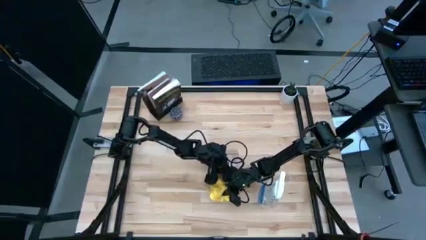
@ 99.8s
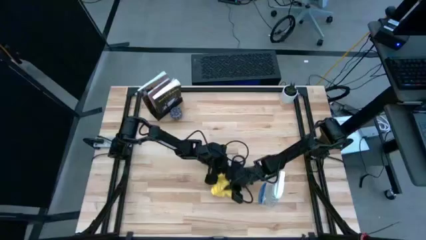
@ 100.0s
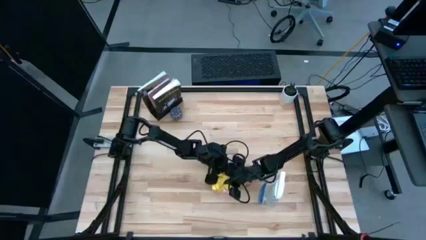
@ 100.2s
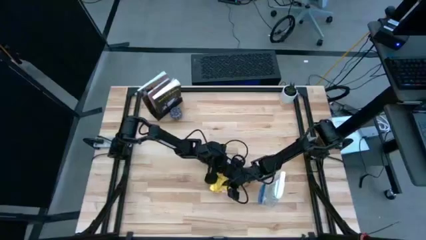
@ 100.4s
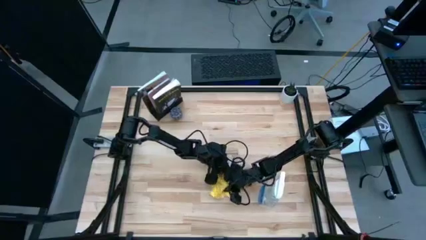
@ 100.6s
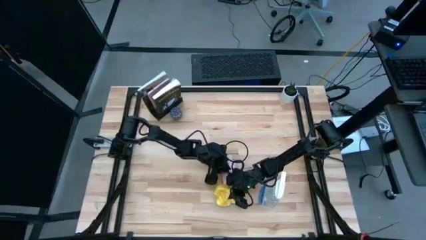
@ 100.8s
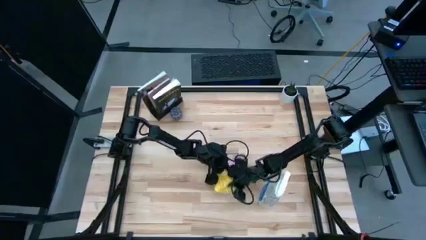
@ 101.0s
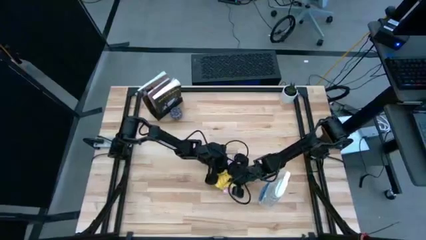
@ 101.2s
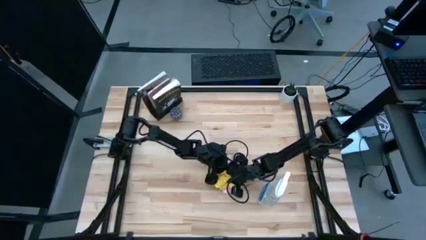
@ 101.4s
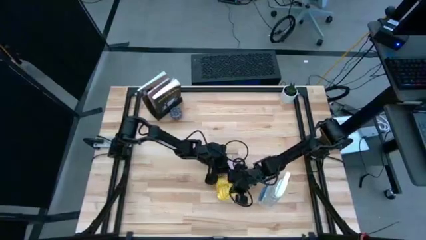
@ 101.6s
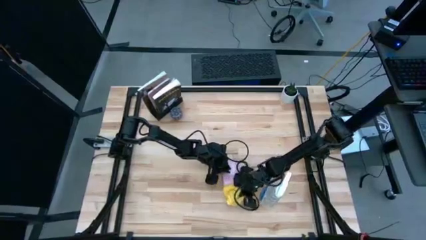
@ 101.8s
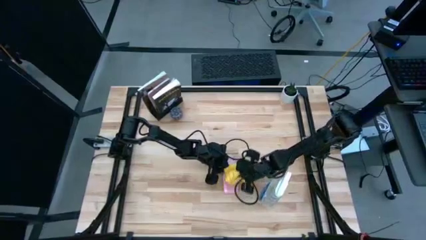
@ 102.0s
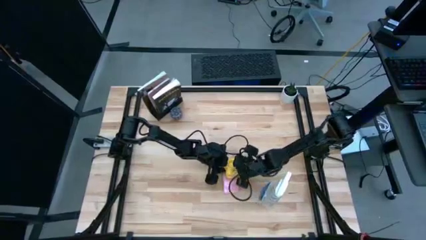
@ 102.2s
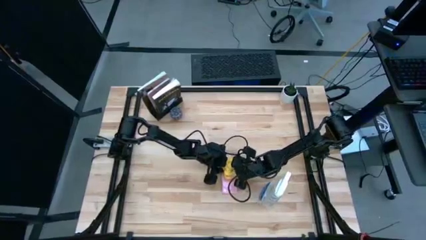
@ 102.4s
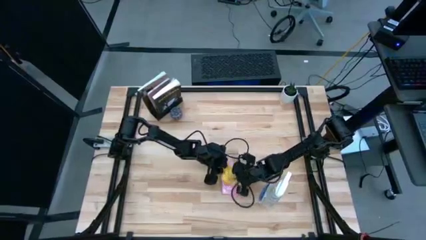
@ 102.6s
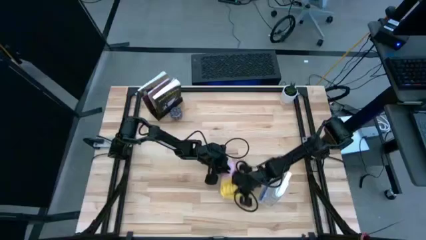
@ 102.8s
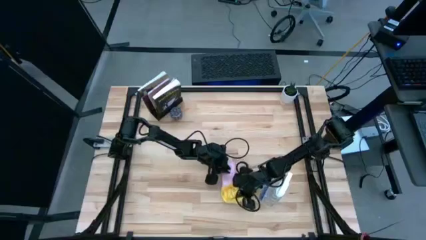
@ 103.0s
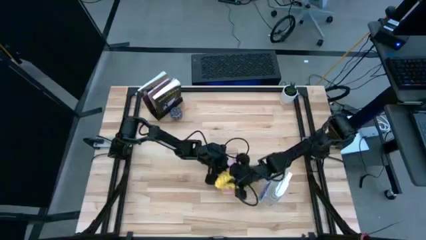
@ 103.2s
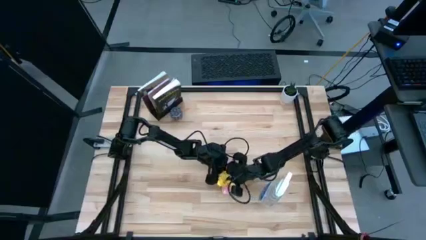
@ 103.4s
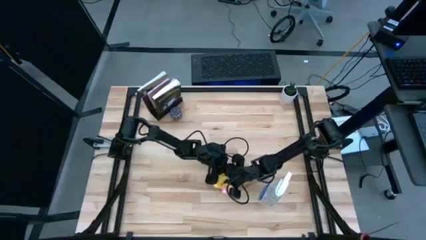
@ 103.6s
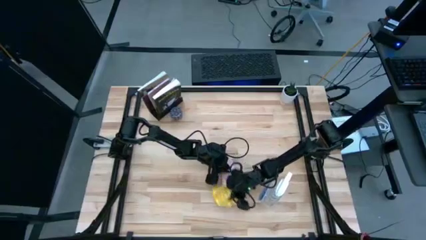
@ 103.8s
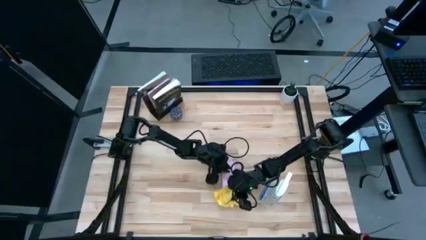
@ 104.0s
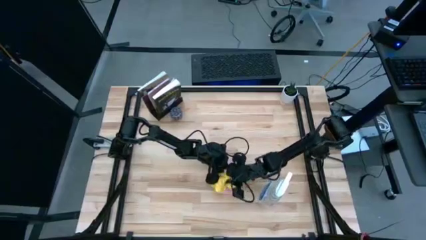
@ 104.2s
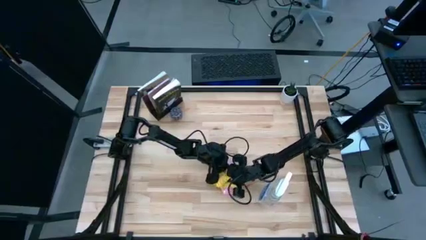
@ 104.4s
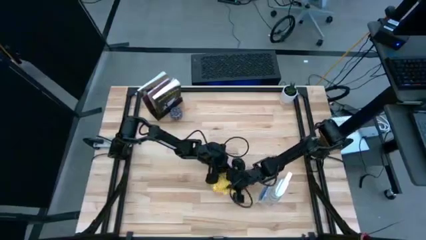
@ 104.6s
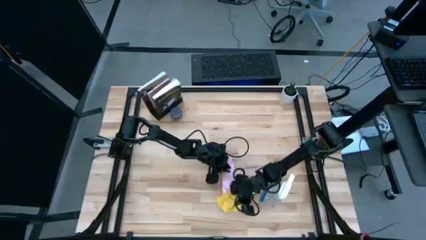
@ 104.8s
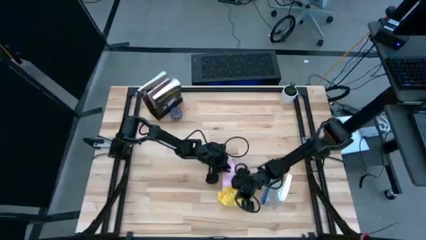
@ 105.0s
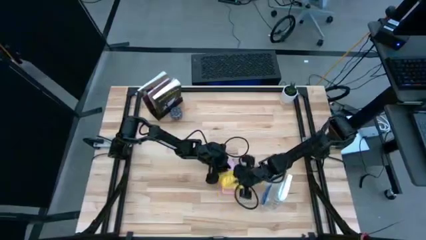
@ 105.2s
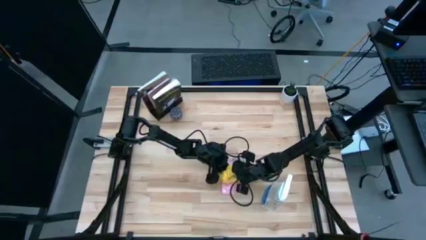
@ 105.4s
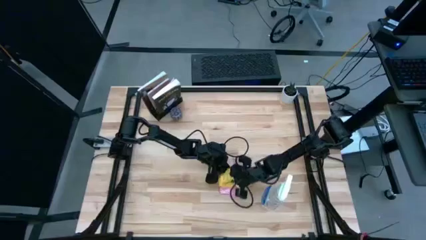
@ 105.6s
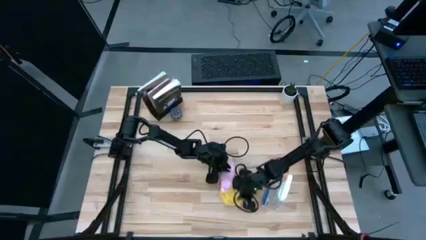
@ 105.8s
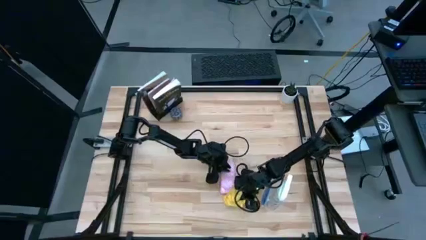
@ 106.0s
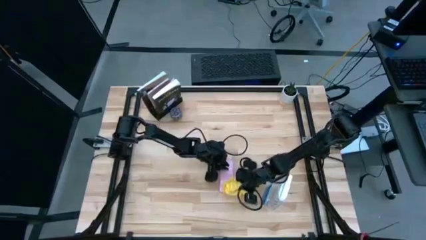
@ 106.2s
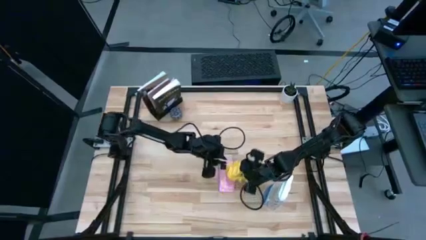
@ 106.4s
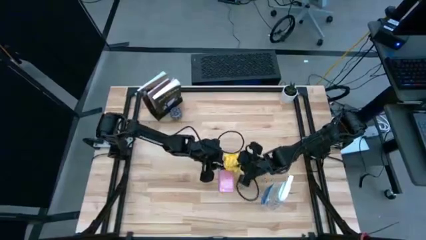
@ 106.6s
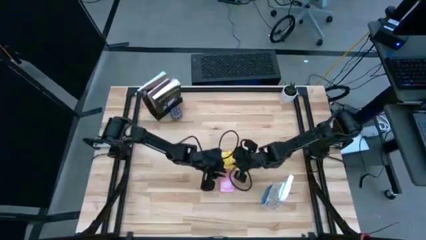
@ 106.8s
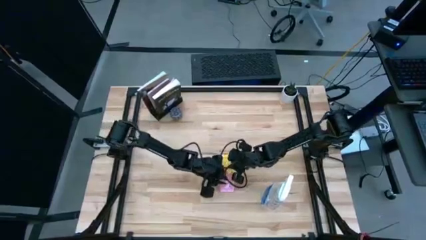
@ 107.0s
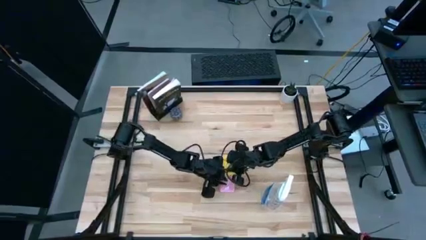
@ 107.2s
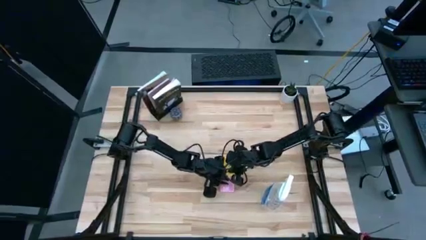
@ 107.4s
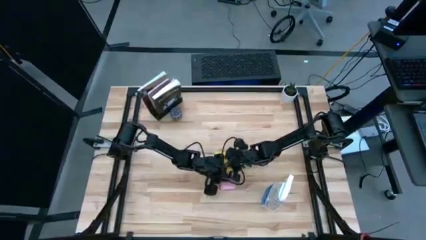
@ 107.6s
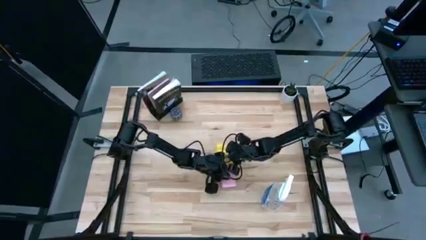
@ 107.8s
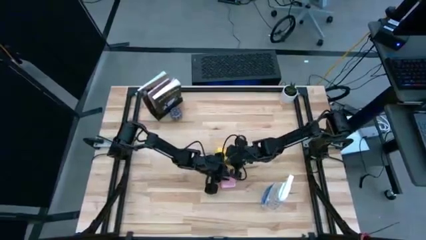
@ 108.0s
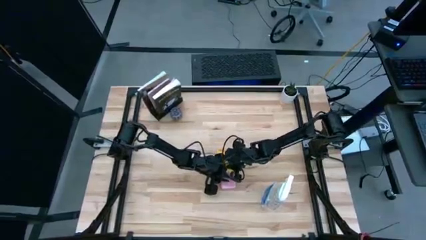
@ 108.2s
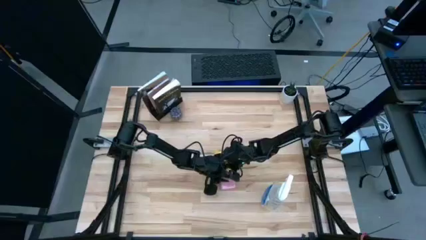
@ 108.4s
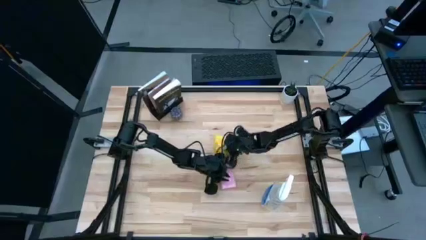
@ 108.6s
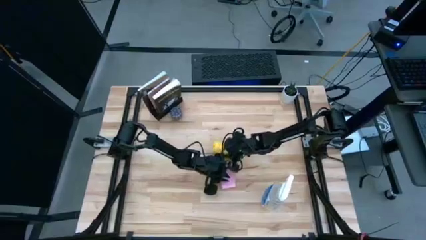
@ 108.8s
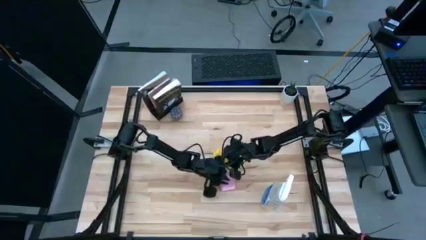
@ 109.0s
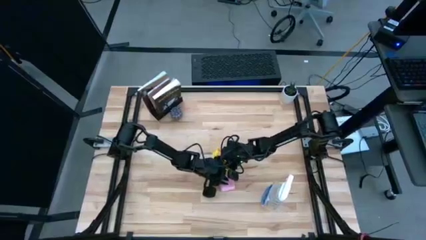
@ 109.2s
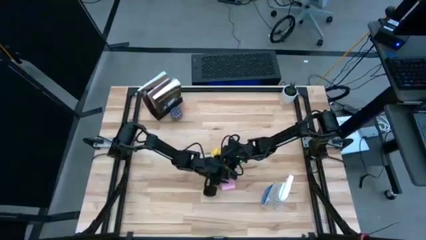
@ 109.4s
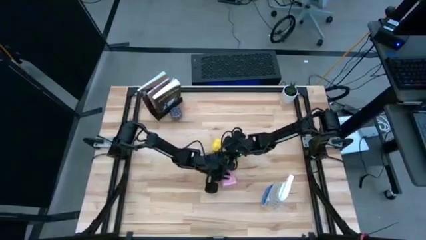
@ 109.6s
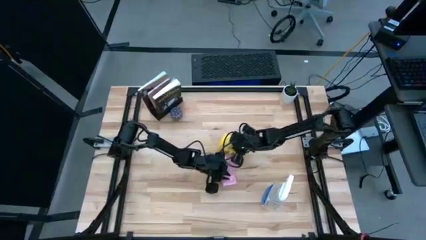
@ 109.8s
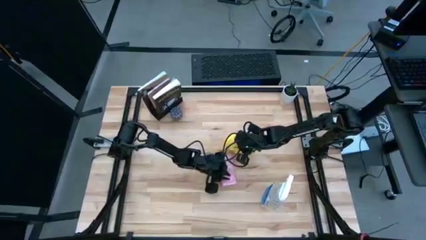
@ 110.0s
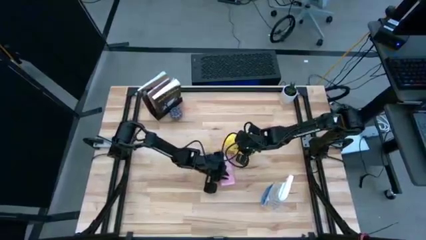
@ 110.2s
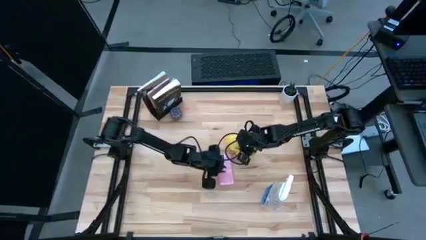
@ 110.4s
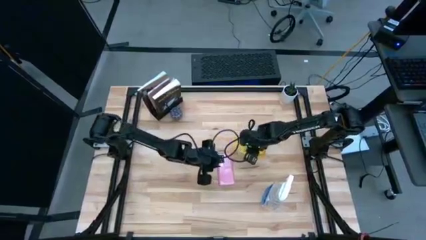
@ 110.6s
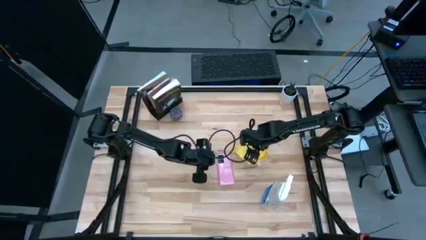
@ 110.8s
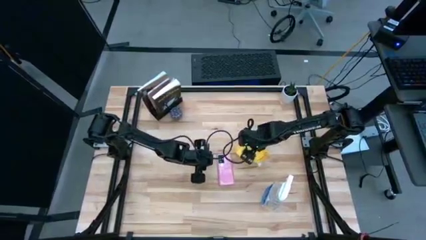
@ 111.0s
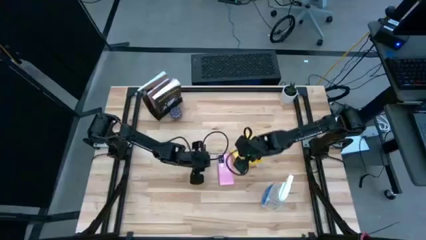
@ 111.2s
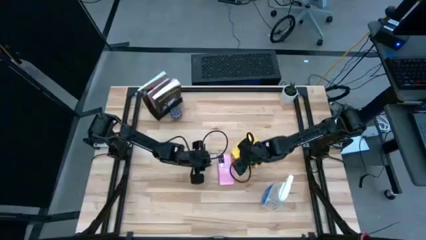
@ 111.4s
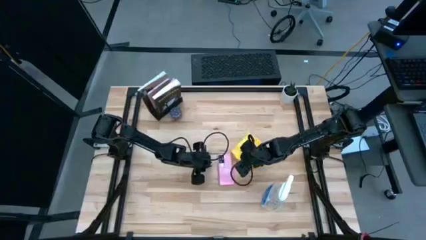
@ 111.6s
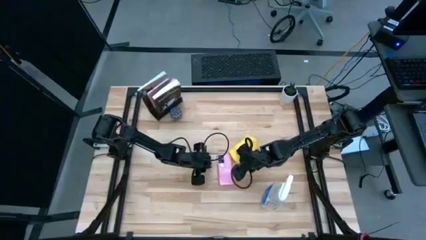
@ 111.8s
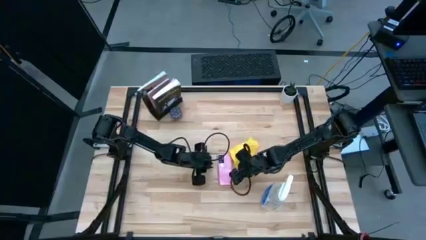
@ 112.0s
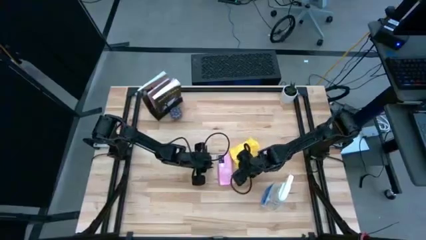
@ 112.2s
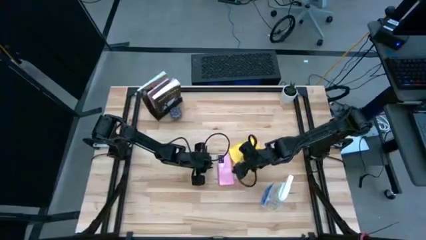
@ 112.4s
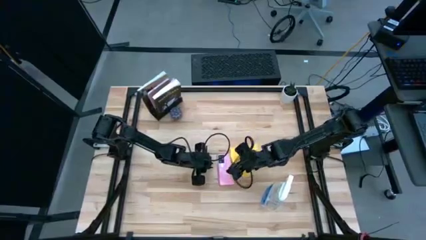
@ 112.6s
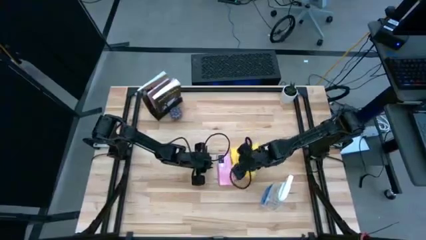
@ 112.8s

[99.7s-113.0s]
Task: Apply microfiber cloth
Wipe the back of the pink cellphone with a yellow microfiber cloth

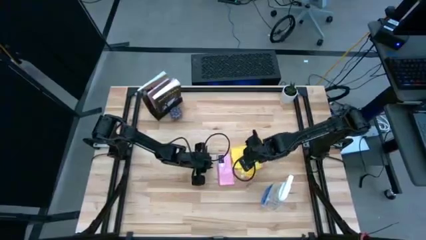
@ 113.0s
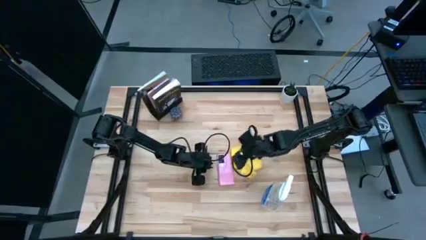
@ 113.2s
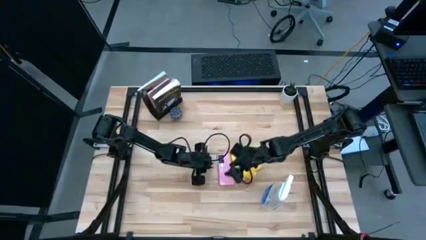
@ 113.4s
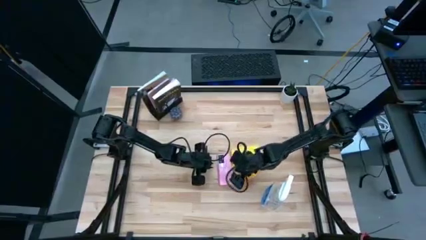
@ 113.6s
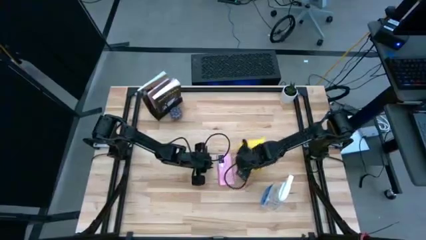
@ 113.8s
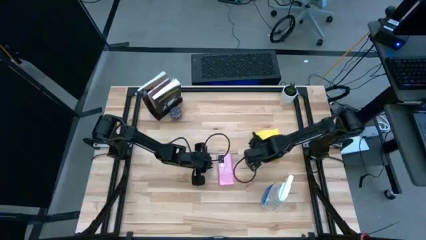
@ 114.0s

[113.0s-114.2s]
Adjust the yellow microfiber cloth

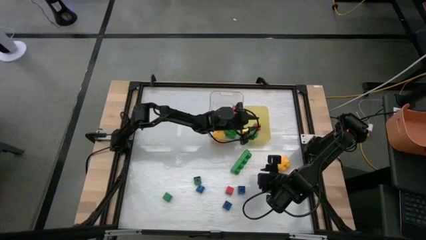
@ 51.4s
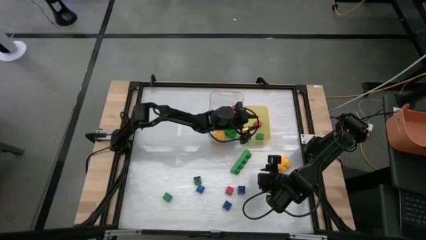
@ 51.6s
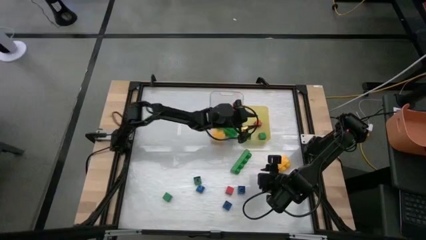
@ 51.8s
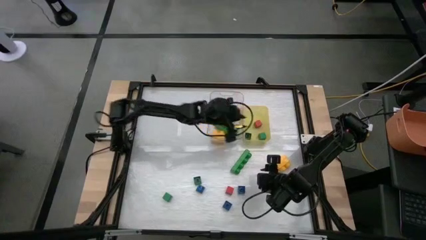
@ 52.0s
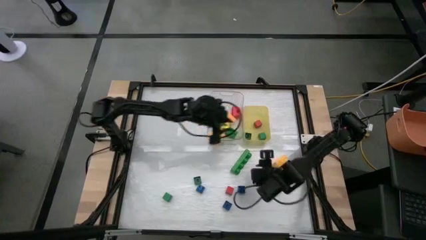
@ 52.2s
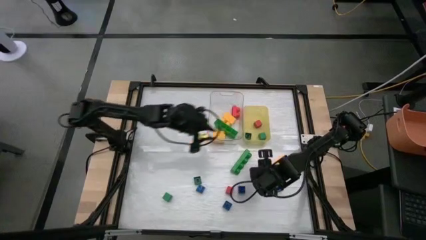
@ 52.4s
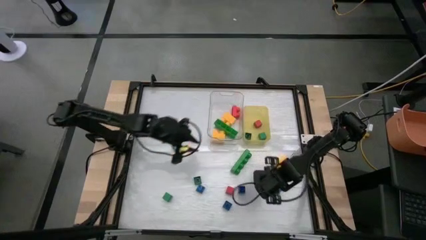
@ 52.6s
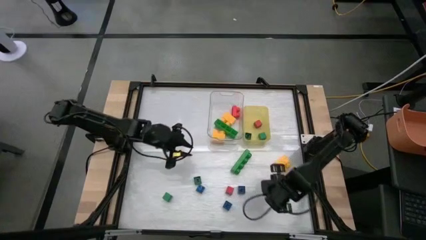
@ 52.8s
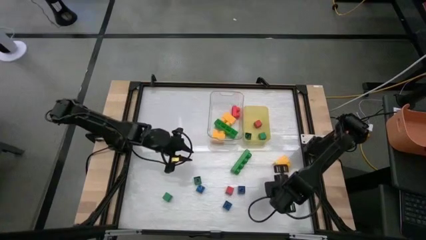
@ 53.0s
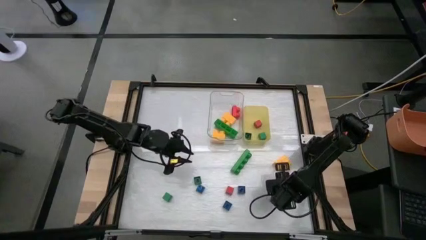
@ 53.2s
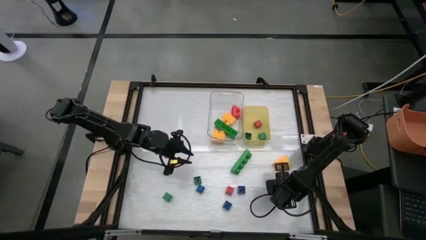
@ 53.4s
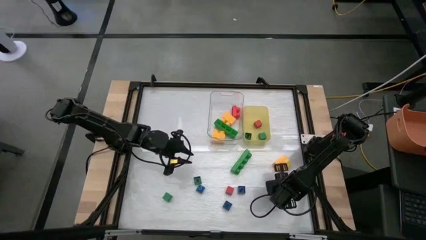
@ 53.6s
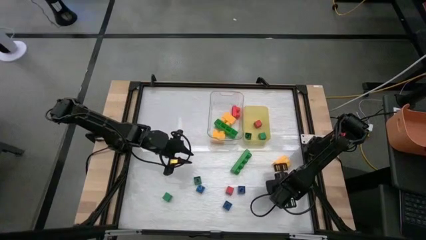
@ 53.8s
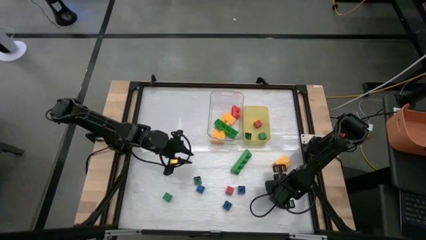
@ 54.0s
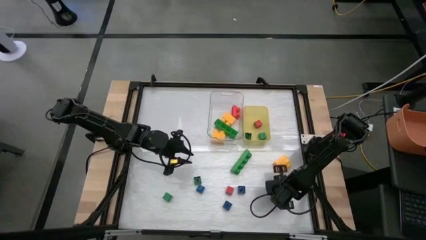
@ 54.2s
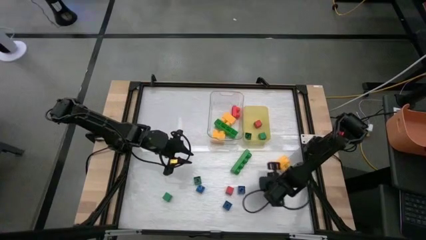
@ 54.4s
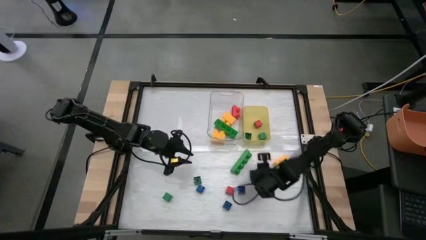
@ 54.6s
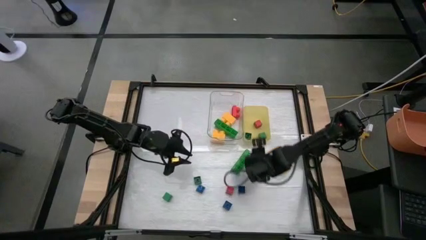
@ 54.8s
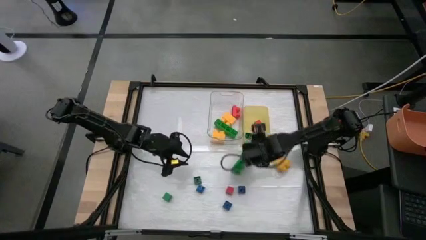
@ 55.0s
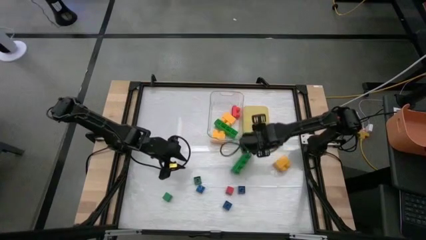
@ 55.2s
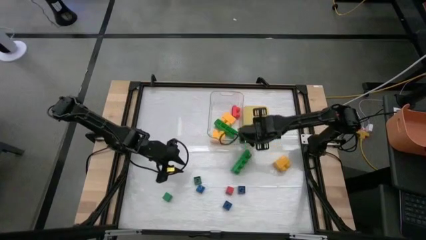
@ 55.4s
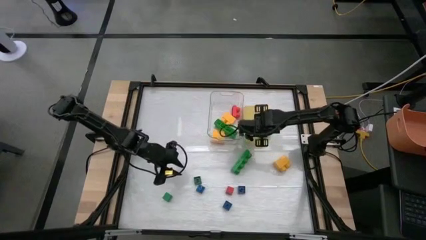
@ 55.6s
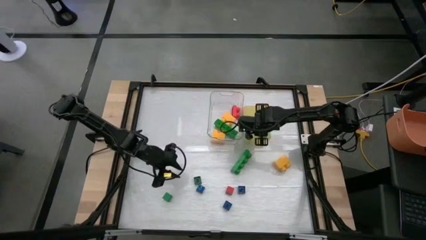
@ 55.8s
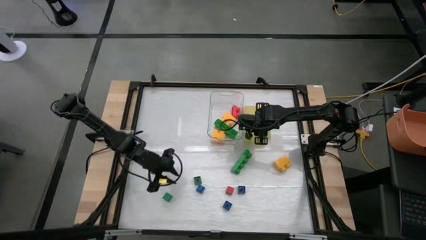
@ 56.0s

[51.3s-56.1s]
Task: Sort blocks by size
Put the small blue game piece into the yellow bin
